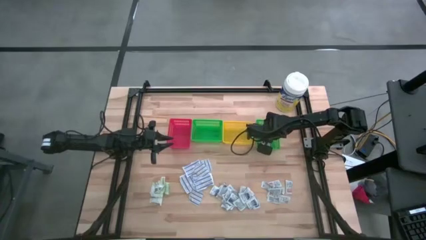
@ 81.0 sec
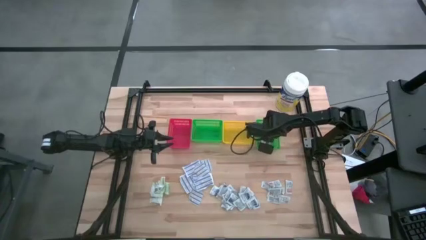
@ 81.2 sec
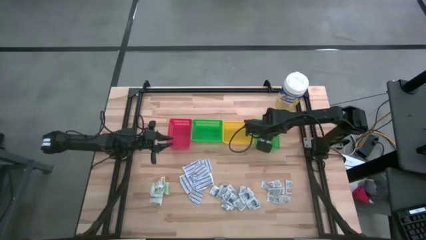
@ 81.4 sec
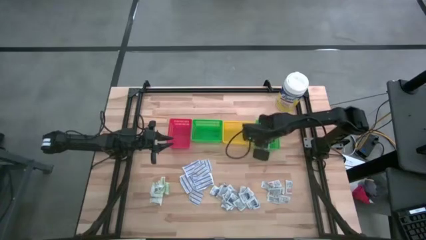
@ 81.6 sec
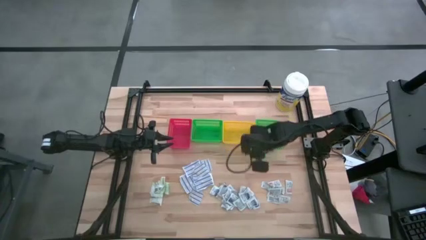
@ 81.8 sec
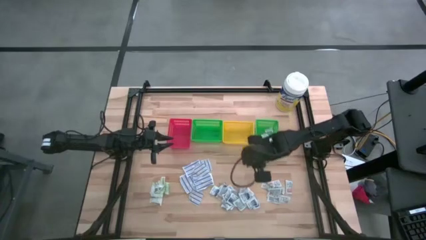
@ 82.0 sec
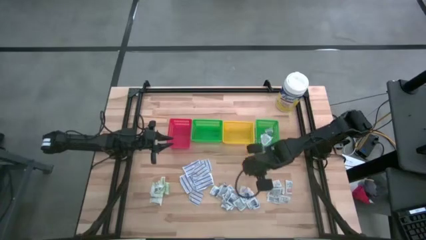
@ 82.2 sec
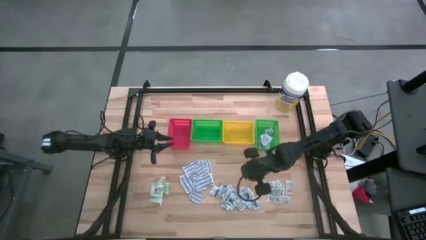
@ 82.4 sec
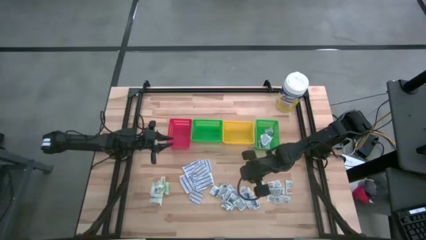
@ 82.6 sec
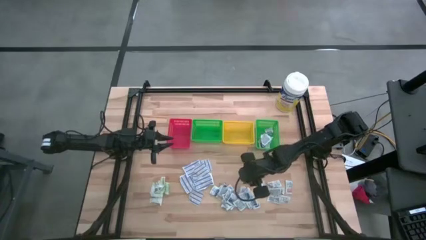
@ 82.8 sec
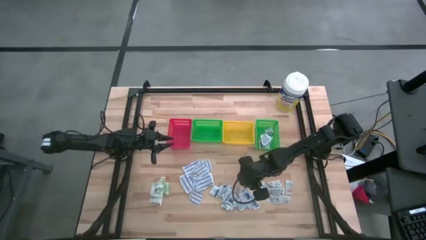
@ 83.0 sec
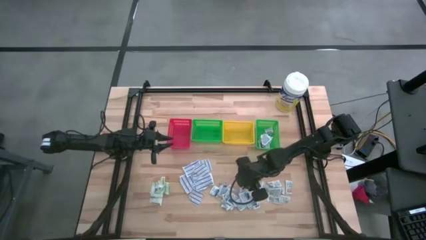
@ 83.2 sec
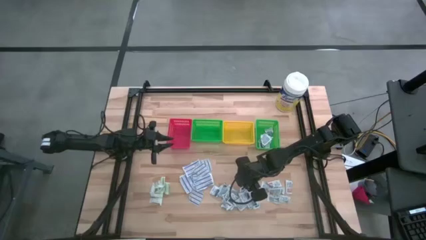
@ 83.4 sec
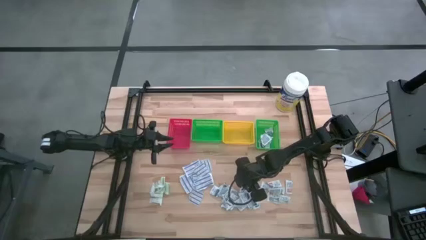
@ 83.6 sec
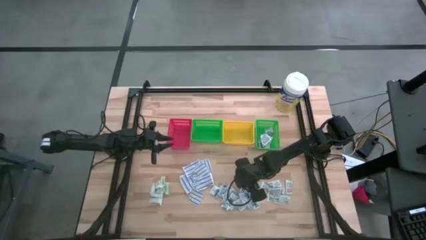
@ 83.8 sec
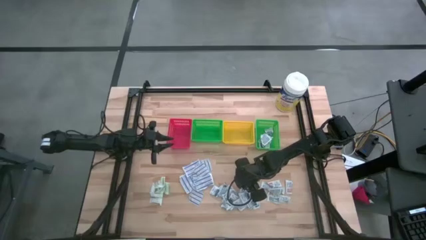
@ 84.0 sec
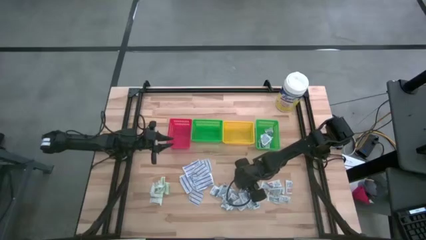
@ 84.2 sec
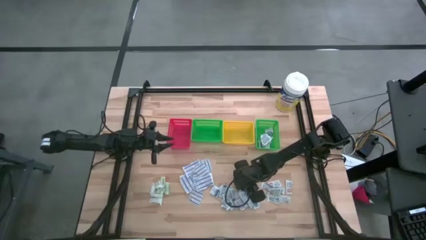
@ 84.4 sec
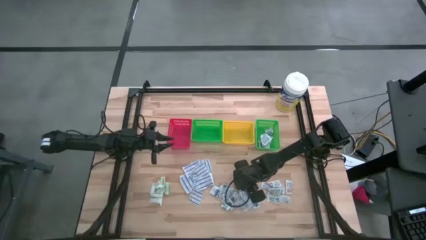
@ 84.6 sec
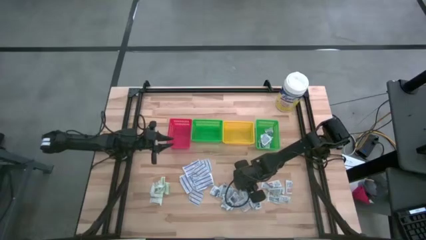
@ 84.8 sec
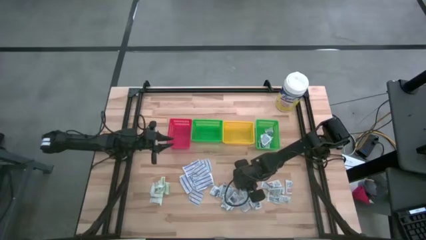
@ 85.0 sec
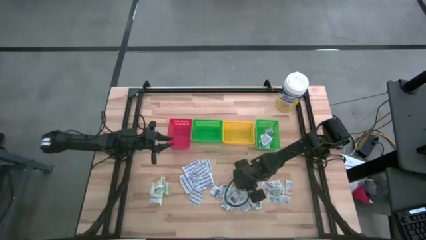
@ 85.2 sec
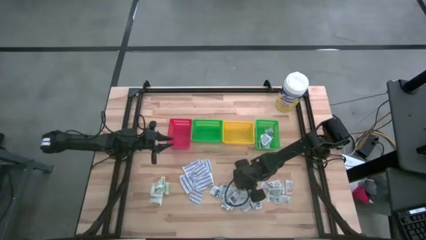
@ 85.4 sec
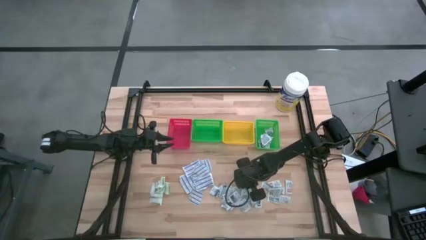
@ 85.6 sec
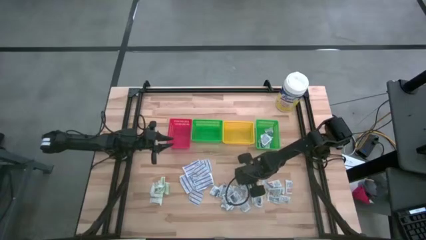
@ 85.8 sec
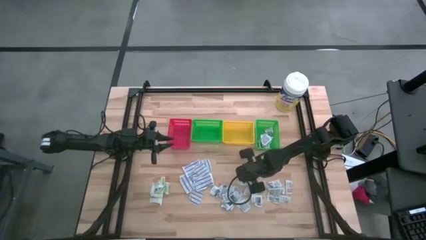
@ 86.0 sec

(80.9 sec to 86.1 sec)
Task: Pick & Place First Aid Supplies
Put the blue alcohol pad into the right green bin

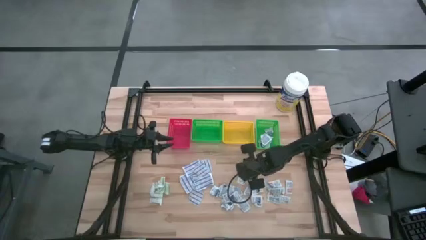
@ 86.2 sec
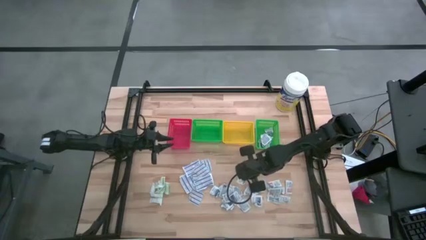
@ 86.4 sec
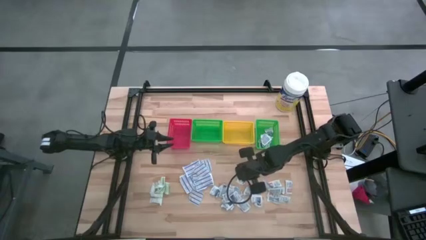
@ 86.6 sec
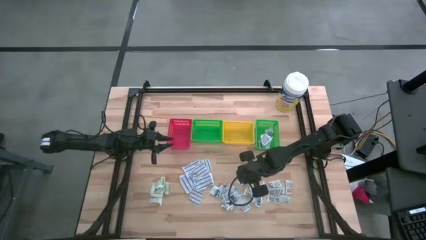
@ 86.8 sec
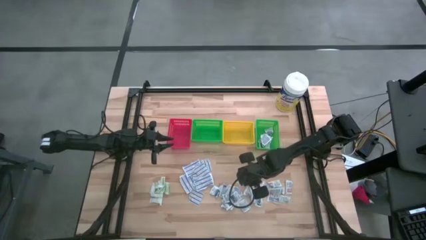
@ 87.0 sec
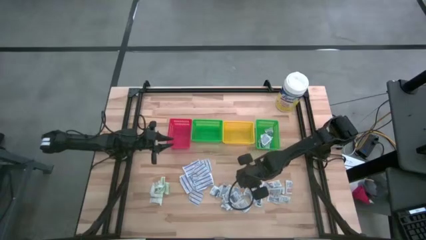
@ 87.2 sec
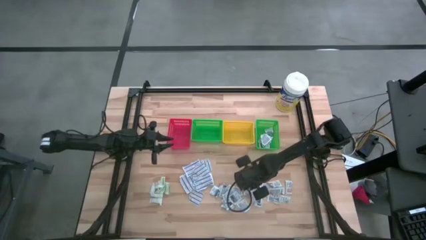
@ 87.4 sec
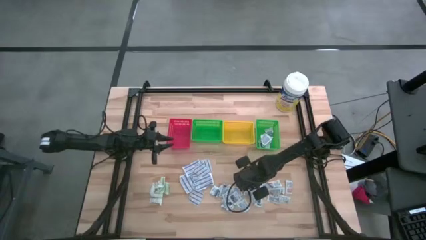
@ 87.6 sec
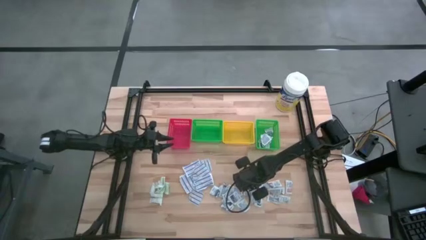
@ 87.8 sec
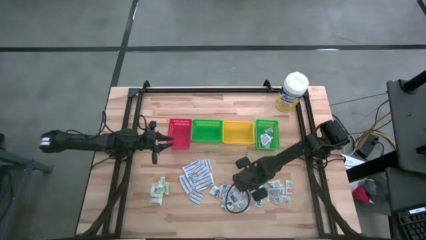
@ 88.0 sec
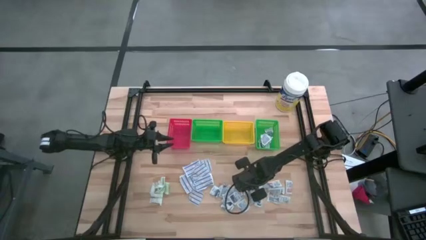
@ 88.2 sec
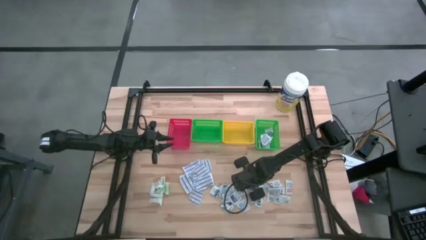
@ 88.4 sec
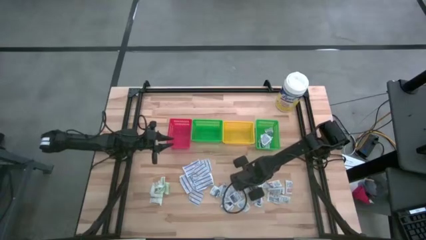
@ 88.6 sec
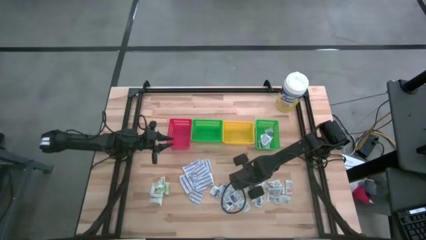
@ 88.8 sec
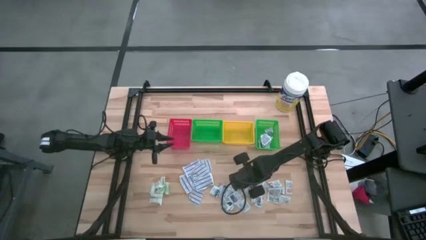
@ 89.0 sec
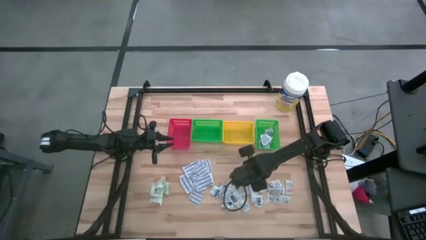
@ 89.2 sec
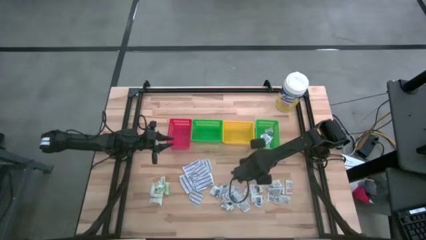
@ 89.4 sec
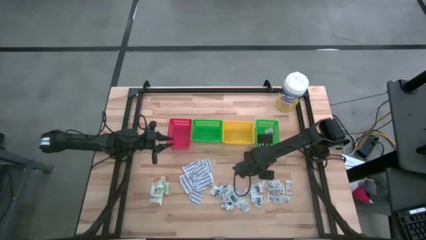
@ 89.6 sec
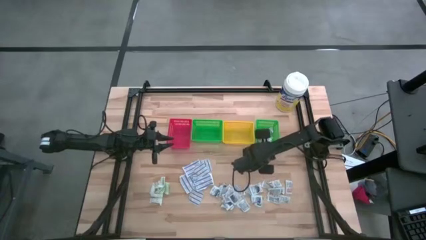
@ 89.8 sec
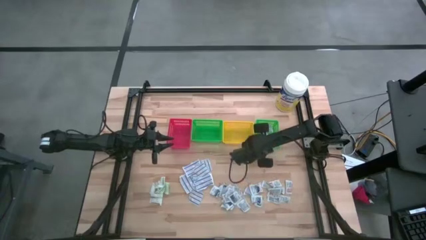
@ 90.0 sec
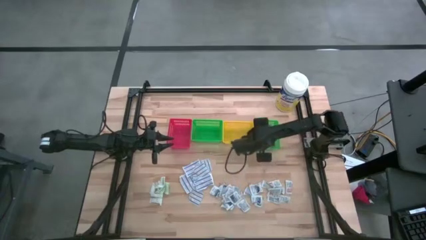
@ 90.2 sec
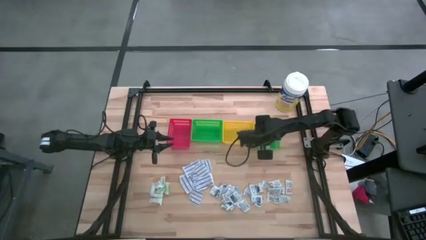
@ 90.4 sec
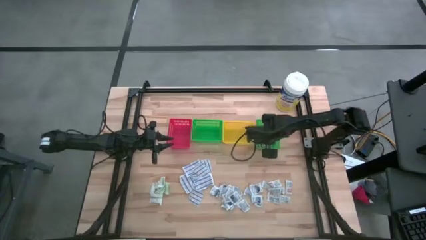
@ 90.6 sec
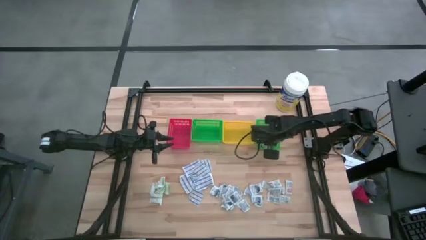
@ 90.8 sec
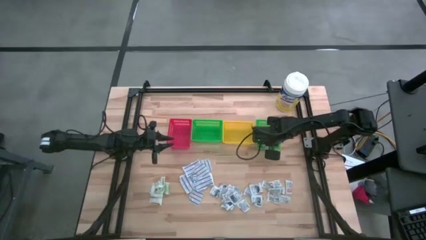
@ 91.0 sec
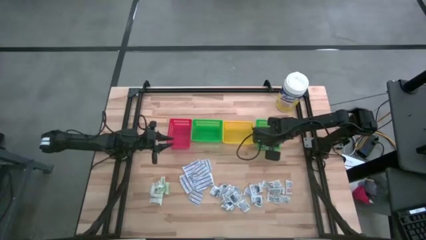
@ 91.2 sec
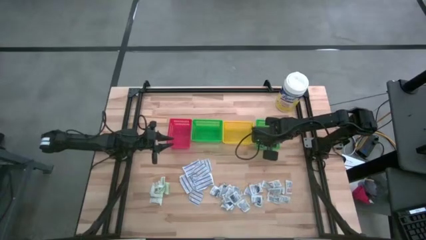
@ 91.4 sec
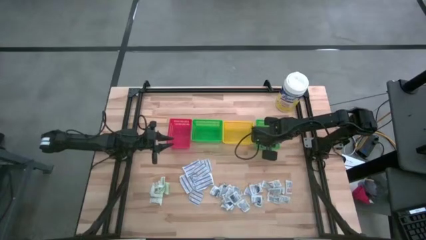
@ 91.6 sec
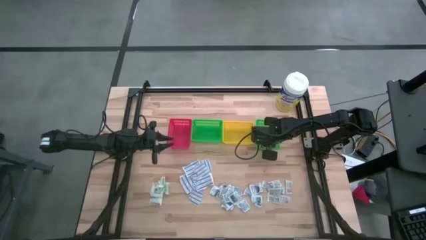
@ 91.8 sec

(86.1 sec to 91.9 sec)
Put the blue alcohol pad into the right green bin

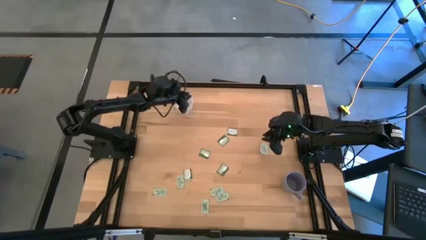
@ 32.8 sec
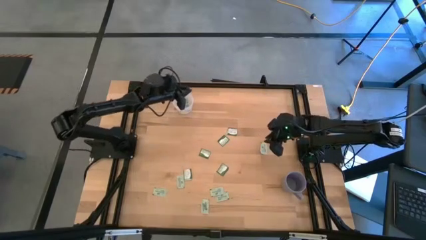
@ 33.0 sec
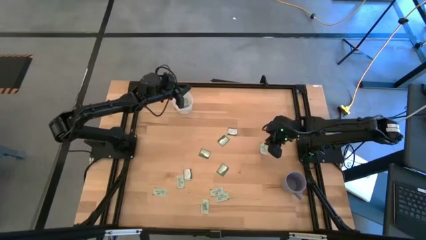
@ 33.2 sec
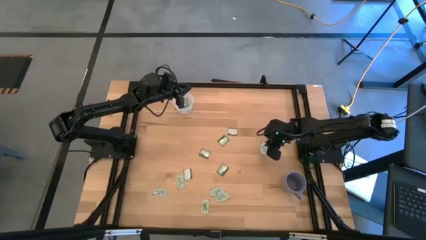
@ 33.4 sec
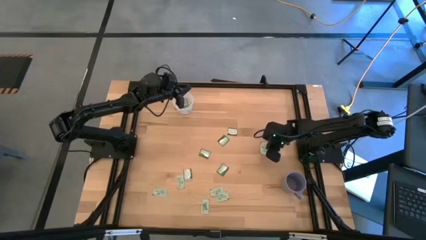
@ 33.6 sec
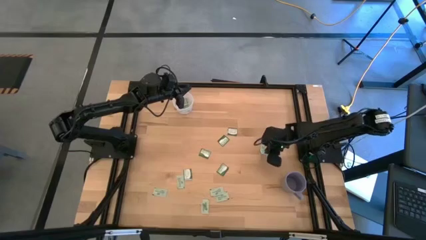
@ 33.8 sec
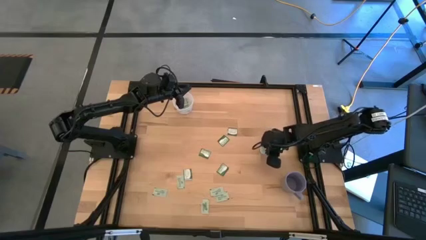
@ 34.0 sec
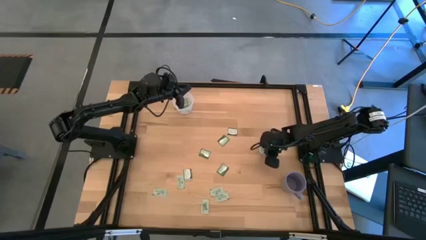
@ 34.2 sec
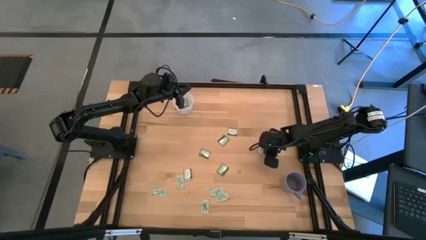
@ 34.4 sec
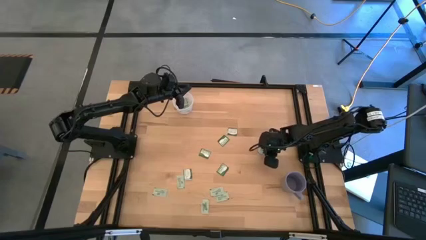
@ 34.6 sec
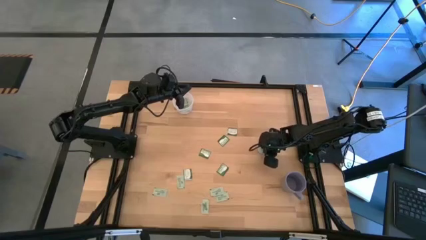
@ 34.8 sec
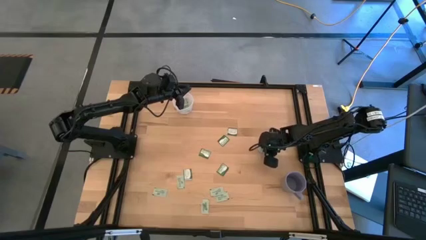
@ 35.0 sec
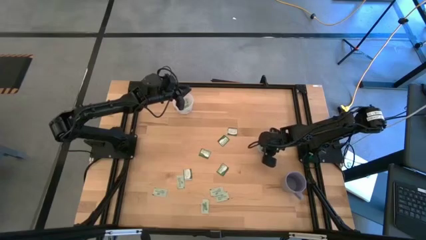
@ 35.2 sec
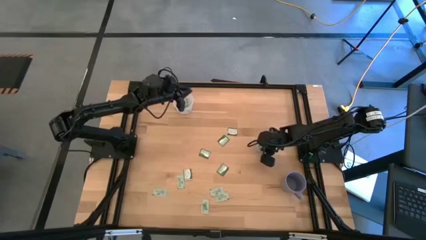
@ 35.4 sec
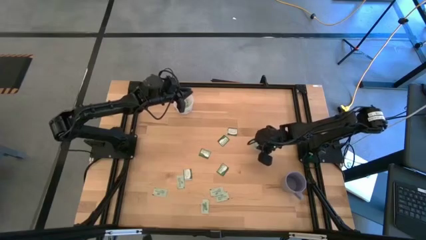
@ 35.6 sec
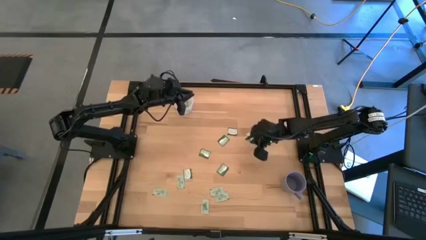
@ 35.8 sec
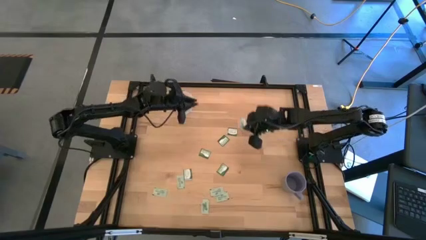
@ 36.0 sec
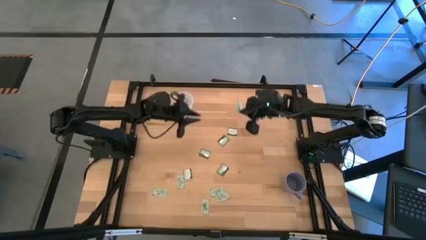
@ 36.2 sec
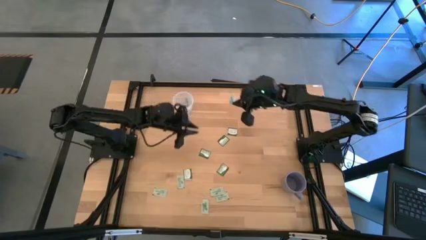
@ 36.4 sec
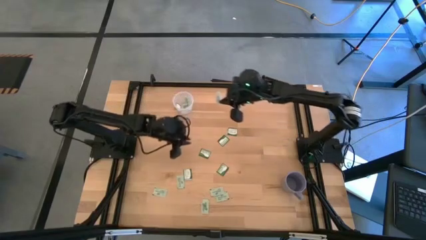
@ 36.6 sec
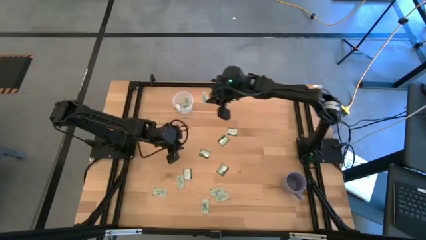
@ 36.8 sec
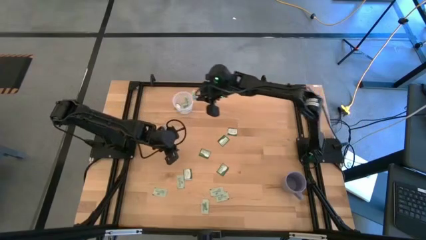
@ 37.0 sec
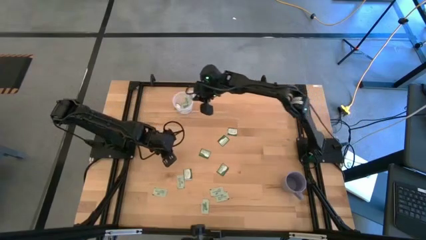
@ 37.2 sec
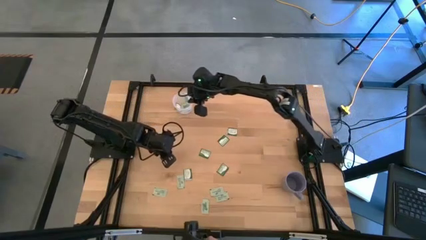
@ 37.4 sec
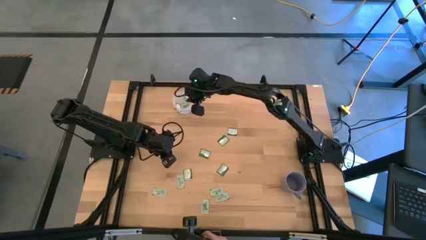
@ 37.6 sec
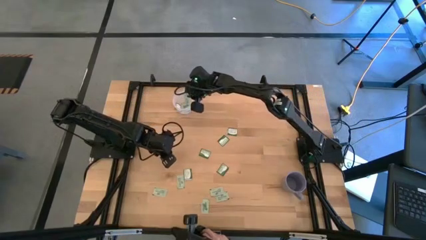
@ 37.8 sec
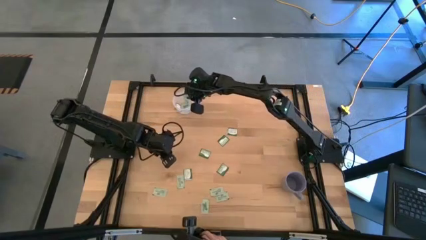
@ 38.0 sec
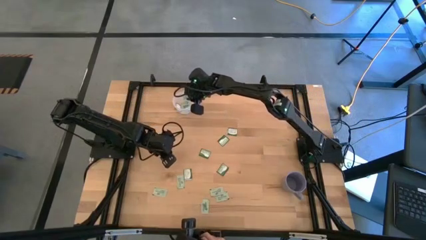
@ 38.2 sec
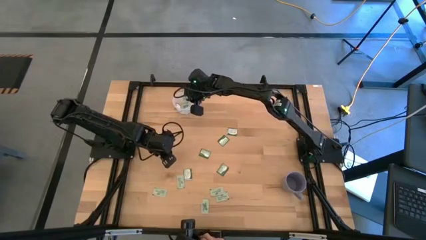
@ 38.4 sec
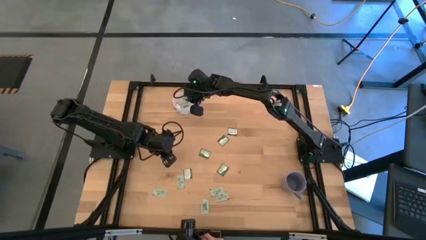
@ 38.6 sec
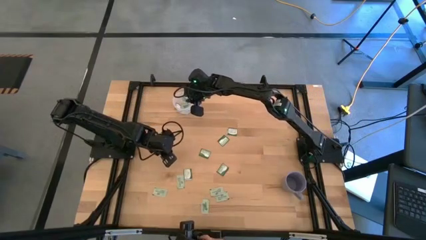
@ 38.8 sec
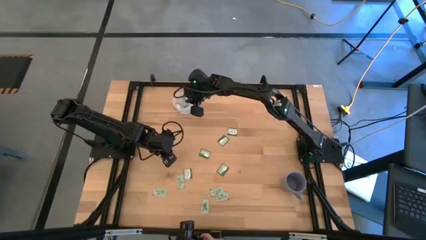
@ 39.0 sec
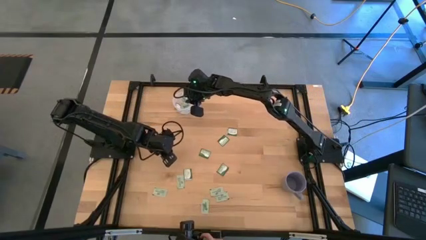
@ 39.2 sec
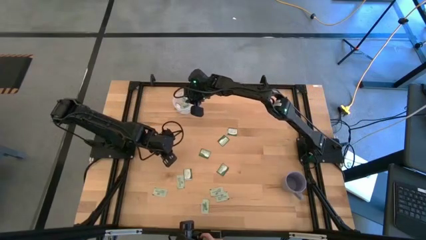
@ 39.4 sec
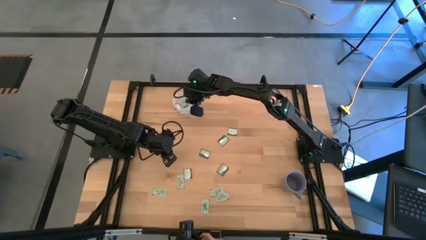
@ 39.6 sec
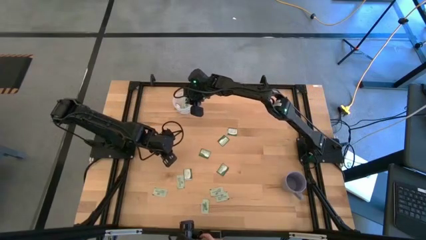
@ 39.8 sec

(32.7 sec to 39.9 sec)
Task: Pick and place items into bin
Put the stevia packet into the transparent bin
